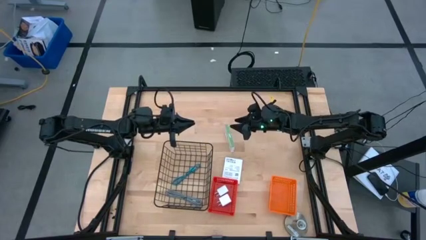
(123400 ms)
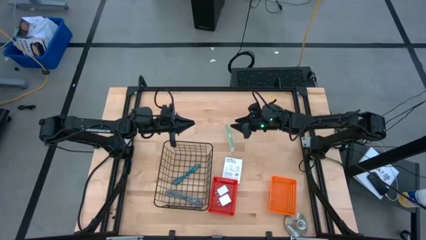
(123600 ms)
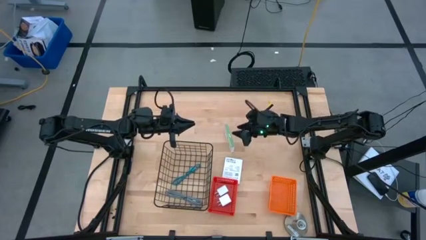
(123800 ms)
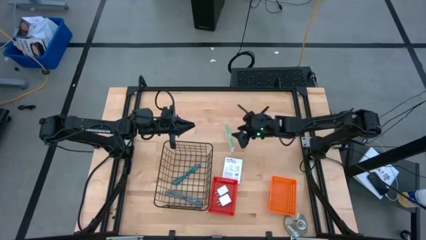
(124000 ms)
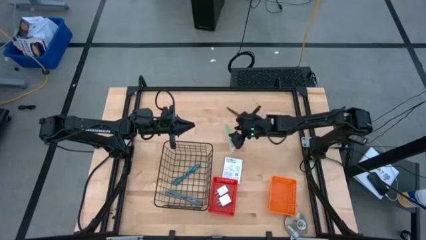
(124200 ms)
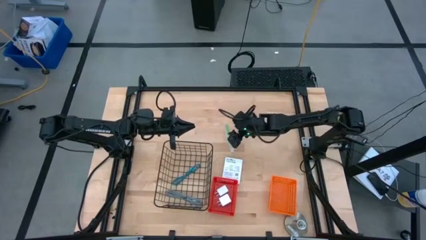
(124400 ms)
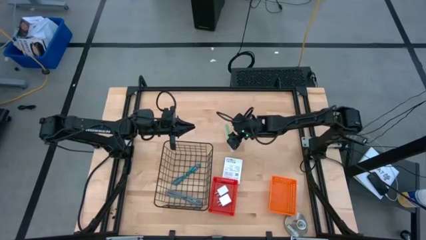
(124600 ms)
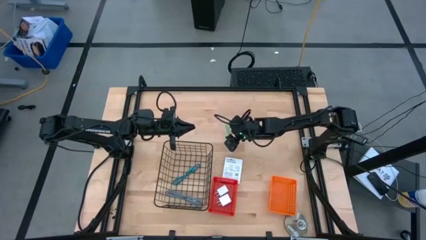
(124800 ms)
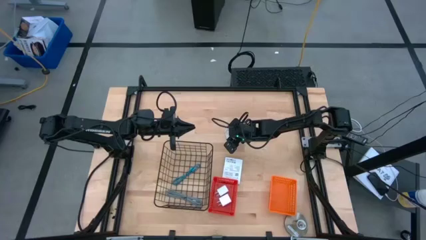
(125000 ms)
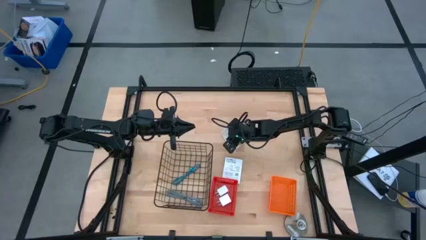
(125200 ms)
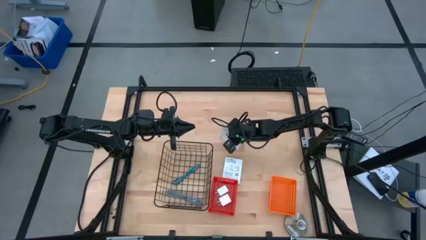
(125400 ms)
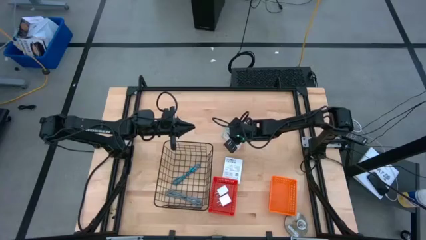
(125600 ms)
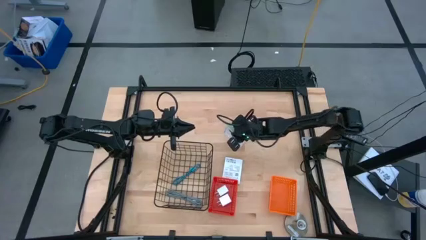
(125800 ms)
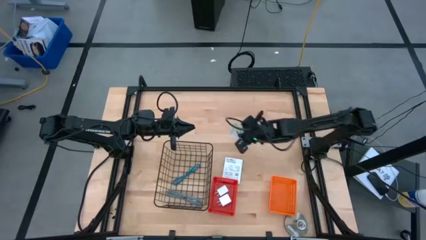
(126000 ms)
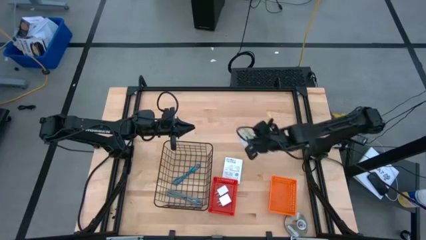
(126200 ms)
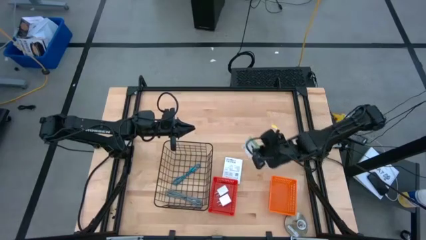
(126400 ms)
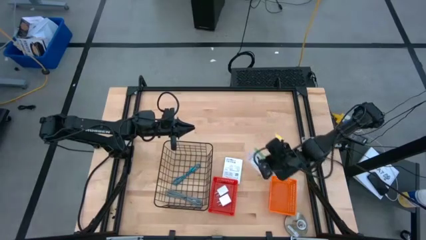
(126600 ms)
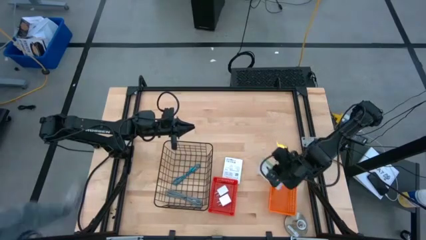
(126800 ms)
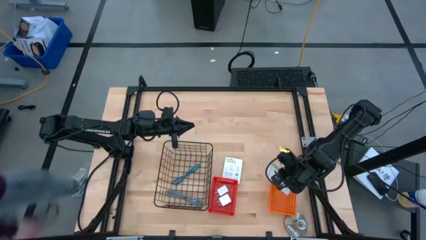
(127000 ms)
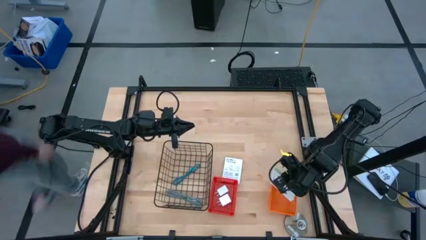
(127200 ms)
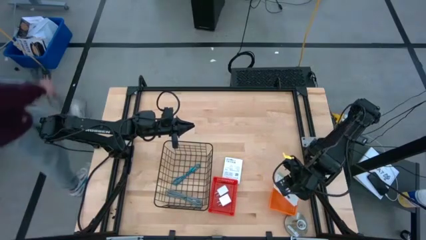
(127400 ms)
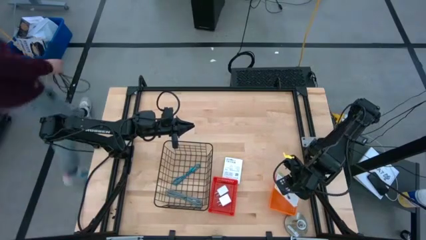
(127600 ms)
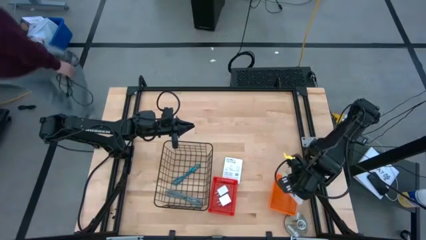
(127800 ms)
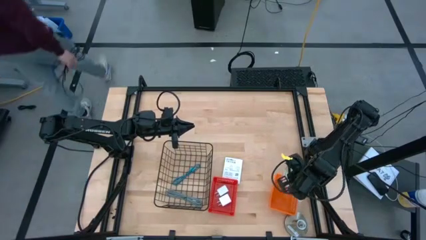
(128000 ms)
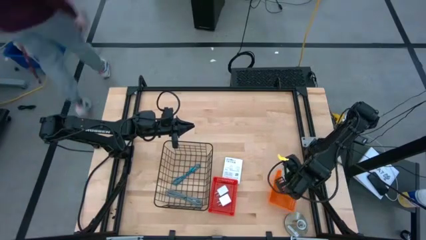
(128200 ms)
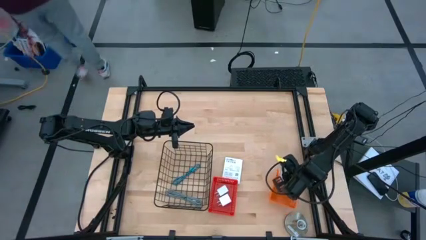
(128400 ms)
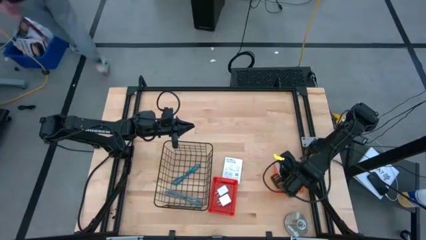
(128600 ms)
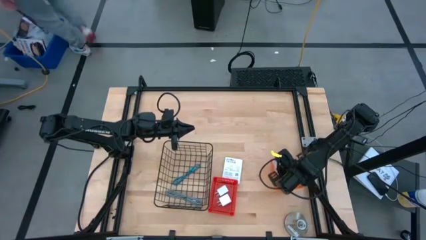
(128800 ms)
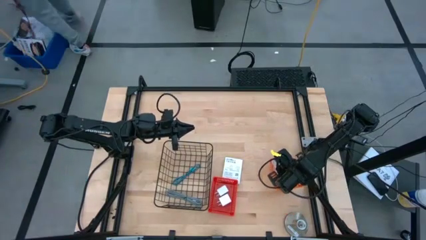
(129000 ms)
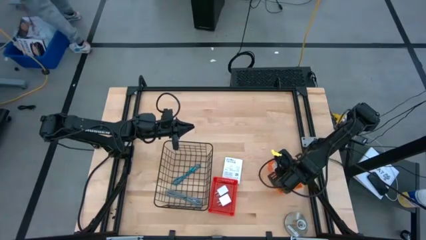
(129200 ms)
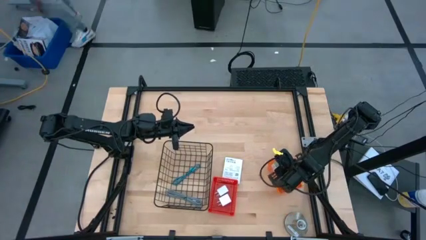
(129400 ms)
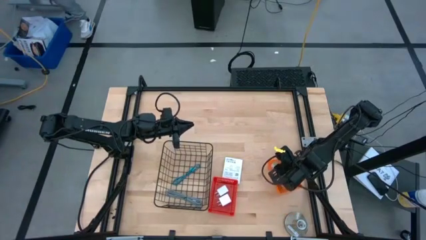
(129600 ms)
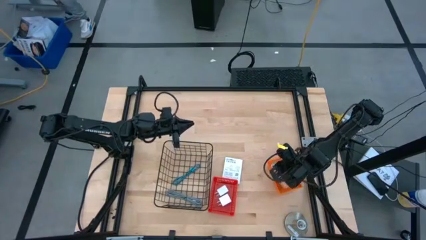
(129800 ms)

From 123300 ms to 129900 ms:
Task: Pick and place items into bin
Put the top card reader box into the orange basket

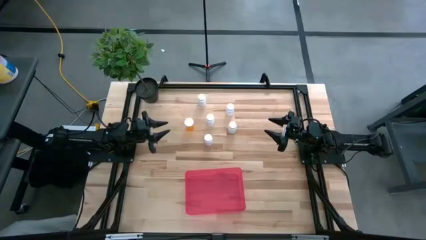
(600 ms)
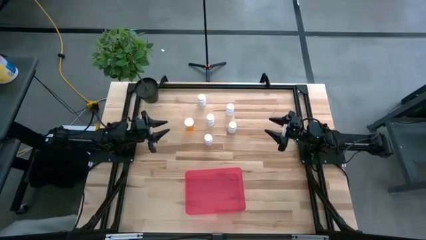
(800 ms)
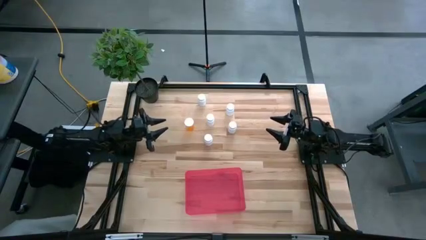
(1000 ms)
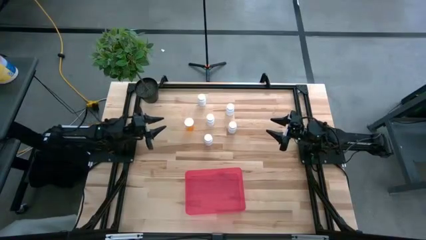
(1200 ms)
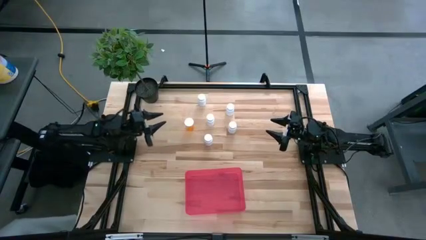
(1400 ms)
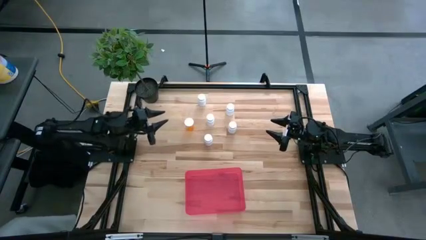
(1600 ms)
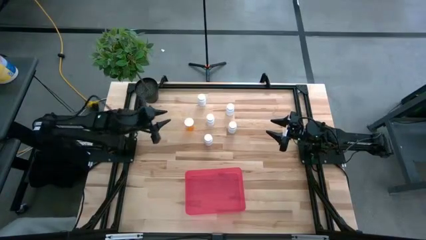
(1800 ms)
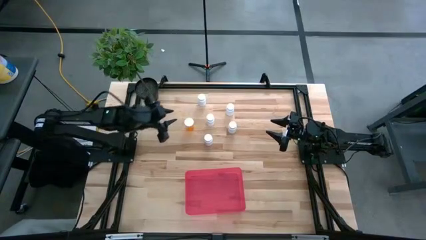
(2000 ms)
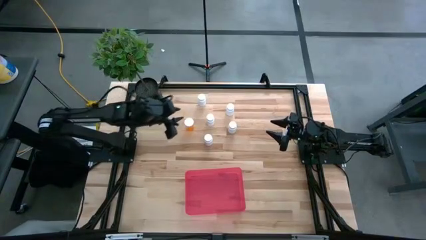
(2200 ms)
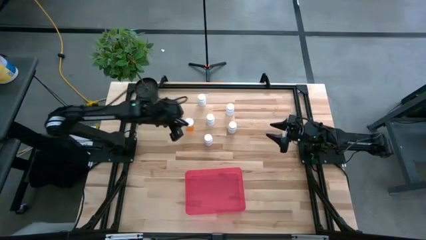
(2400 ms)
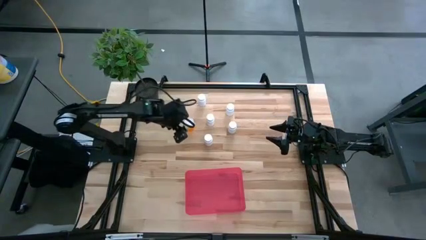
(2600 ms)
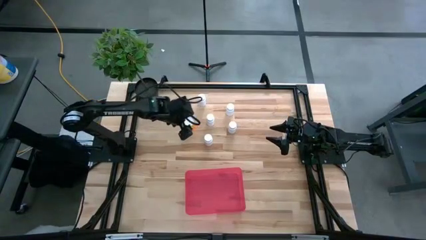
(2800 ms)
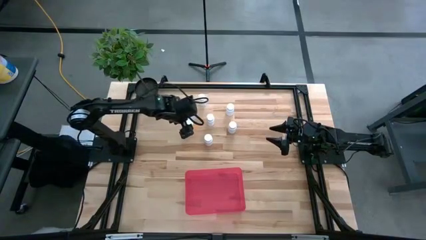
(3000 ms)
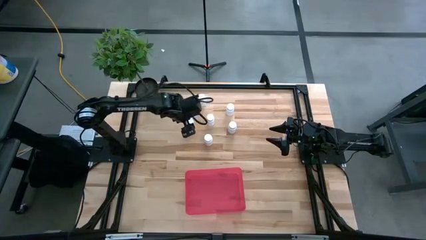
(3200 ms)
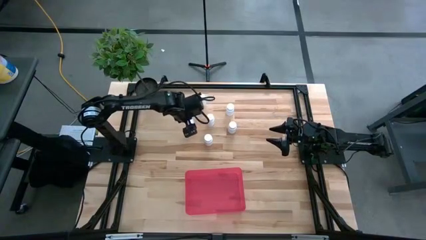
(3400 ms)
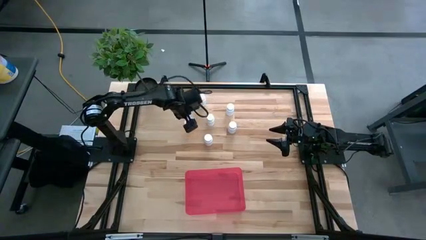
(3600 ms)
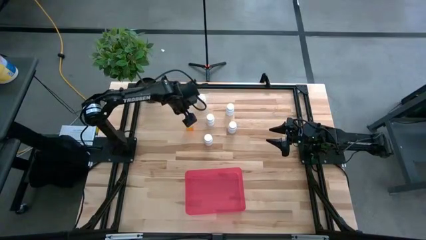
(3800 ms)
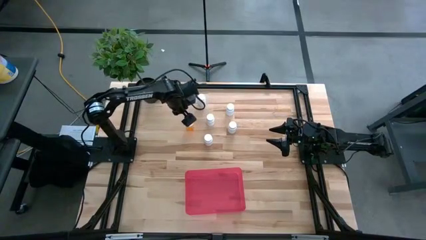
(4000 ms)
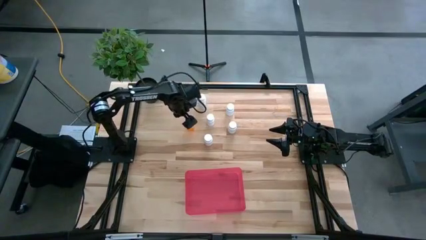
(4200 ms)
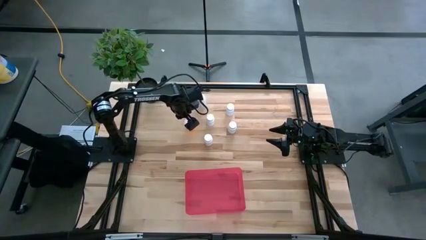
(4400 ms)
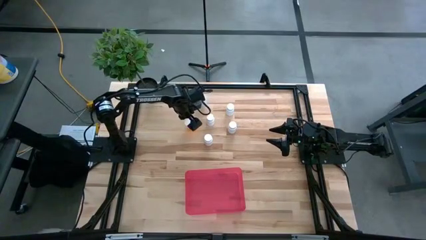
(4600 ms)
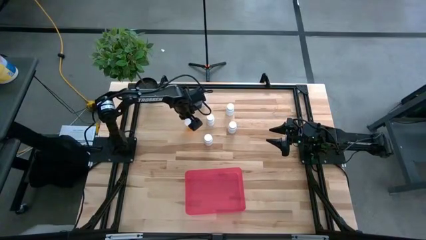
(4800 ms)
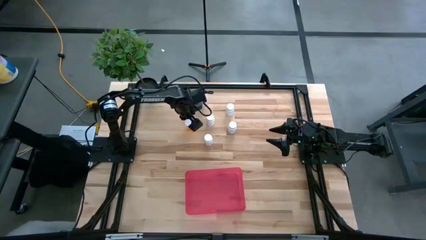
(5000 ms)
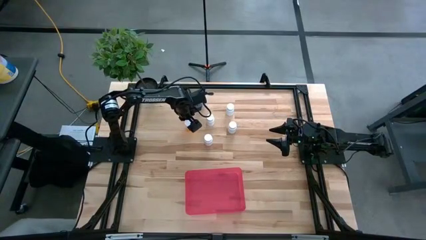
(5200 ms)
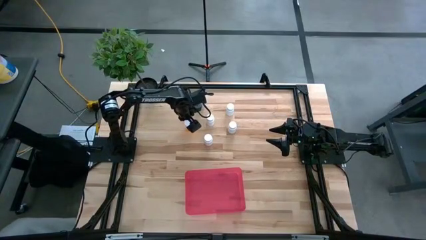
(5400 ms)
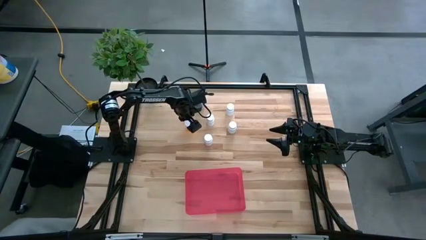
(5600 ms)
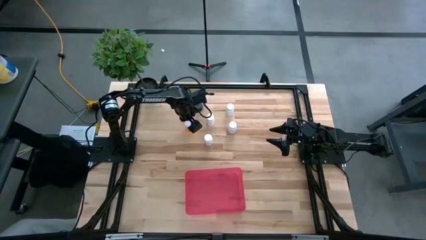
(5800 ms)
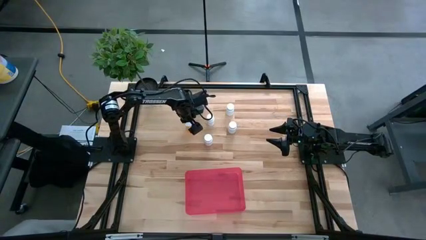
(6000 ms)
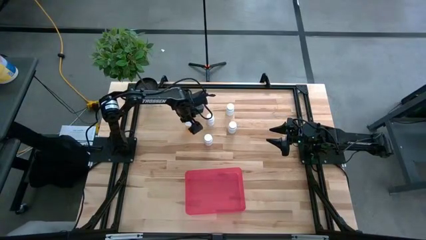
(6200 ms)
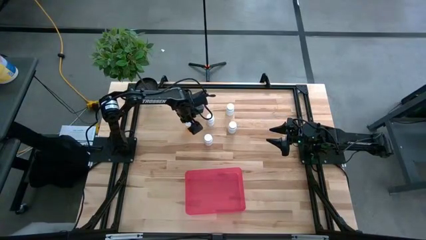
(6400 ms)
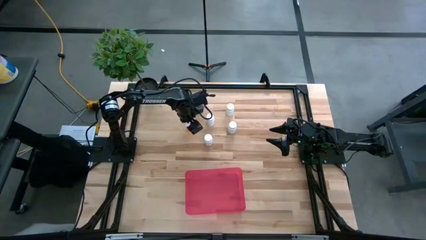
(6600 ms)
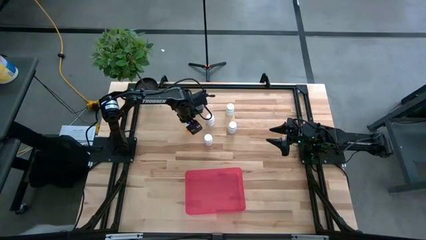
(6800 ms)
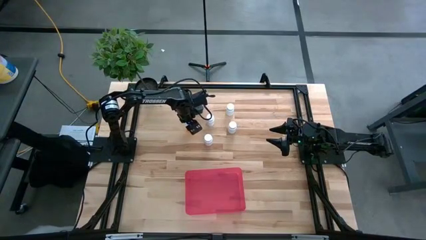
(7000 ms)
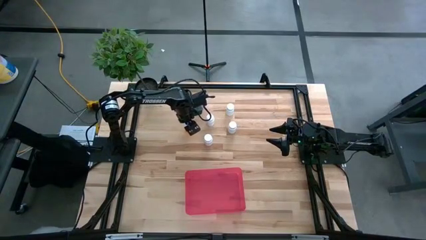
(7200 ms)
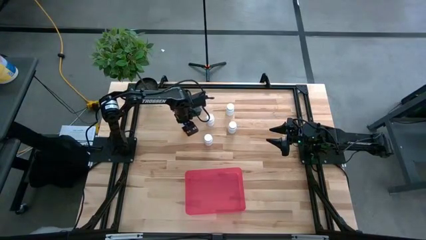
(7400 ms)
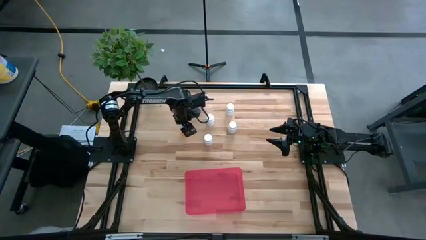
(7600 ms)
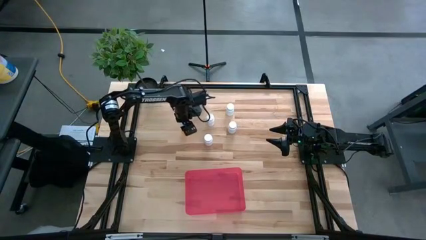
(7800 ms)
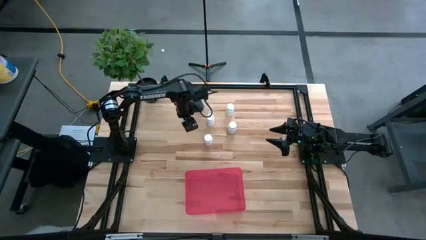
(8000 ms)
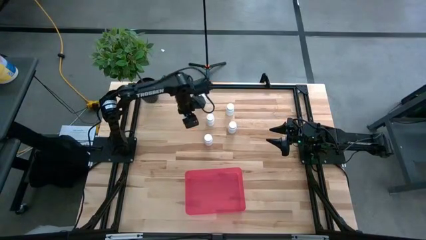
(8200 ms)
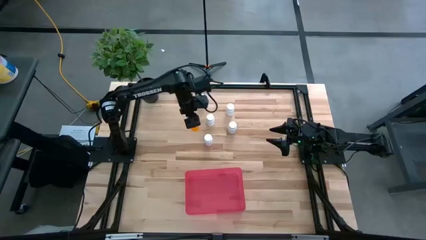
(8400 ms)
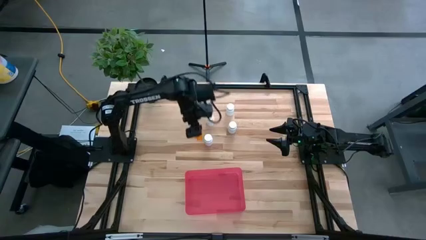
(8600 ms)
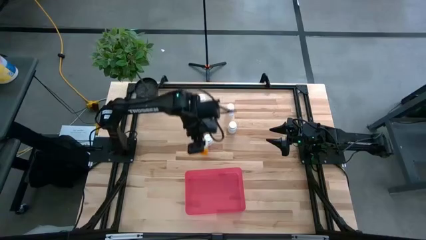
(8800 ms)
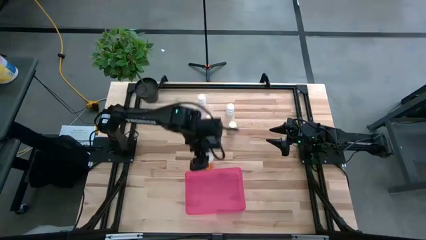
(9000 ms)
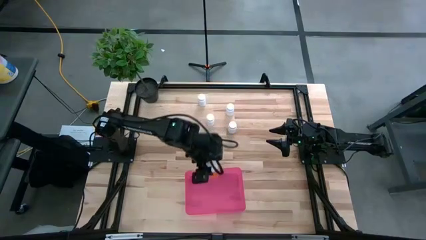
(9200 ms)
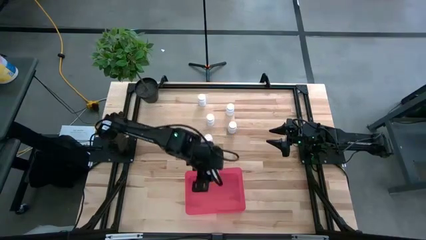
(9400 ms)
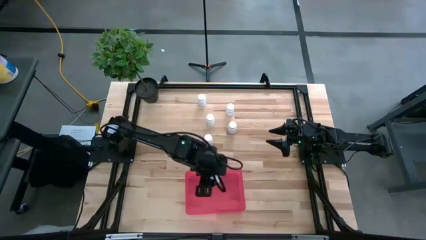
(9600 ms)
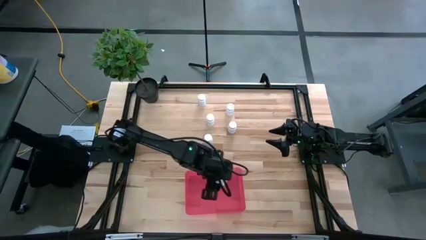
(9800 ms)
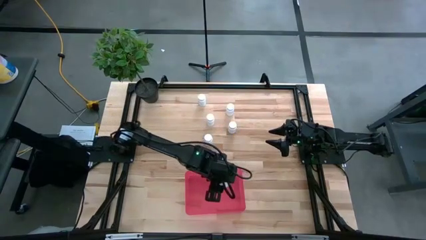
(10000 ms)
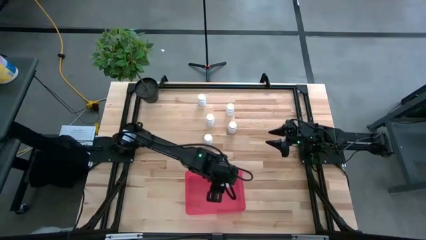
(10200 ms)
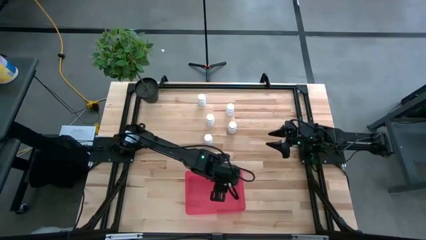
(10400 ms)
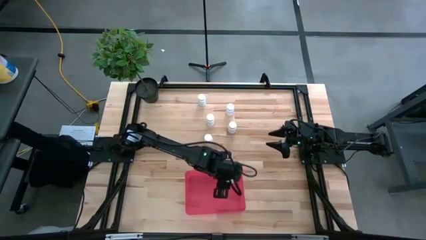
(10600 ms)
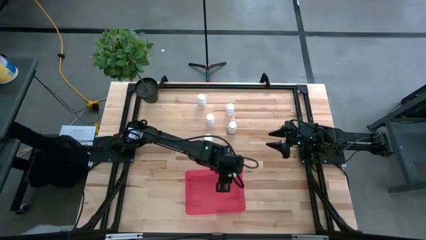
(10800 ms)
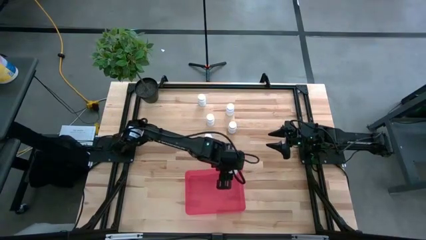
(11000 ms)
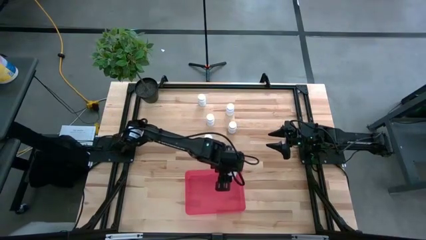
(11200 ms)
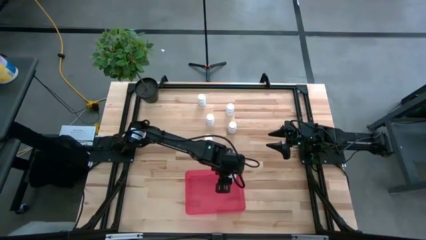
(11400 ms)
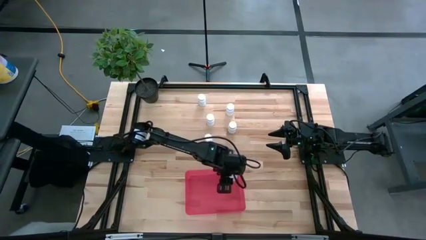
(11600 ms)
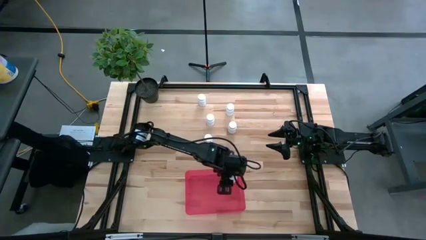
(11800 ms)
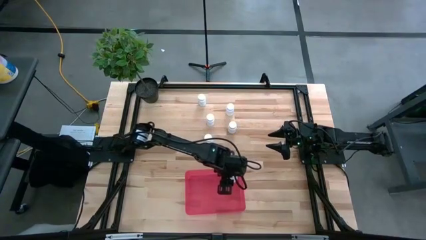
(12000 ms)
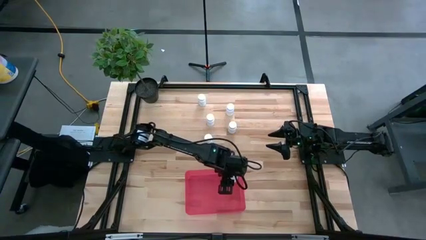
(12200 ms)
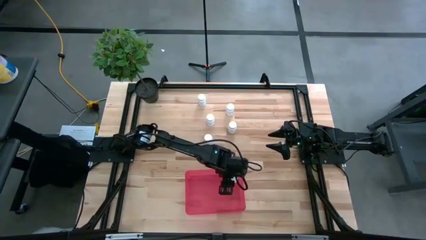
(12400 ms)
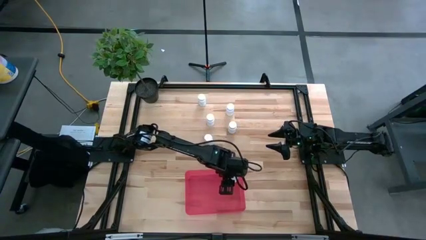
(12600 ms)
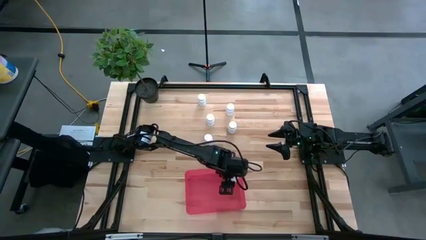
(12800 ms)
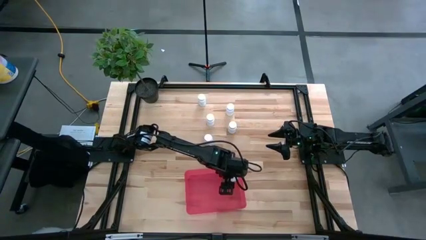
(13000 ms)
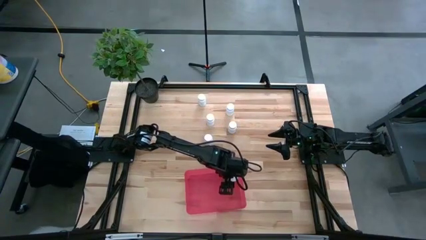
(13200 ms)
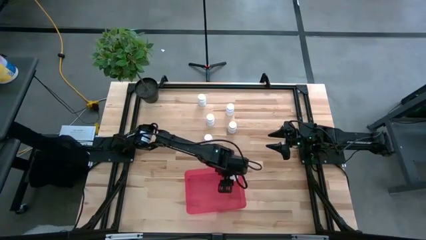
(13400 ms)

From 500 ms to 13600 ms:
Task: Pick and place pill bottles into a basket
Put the orange pill bottle into the red bin
